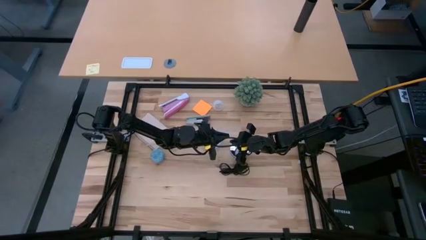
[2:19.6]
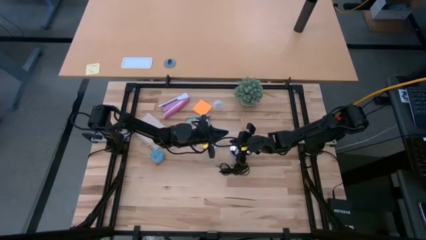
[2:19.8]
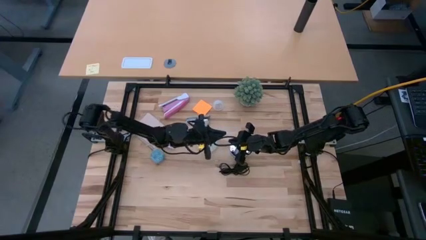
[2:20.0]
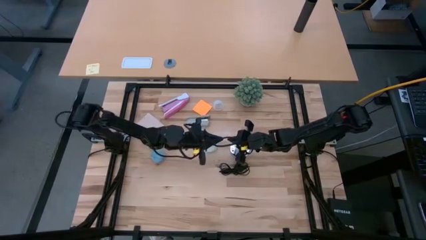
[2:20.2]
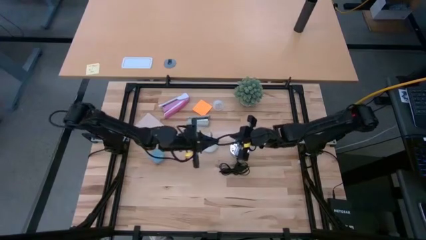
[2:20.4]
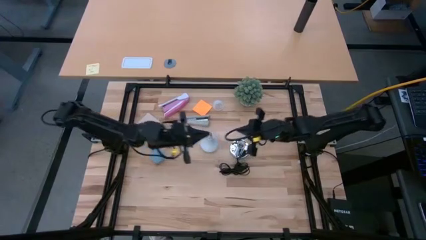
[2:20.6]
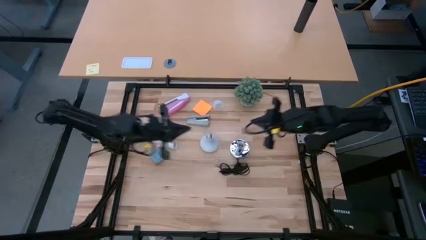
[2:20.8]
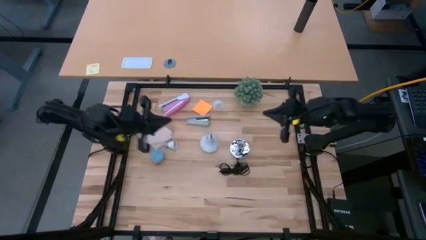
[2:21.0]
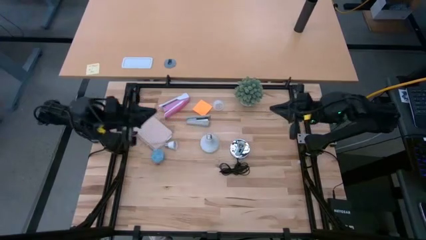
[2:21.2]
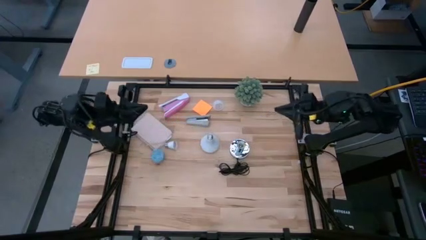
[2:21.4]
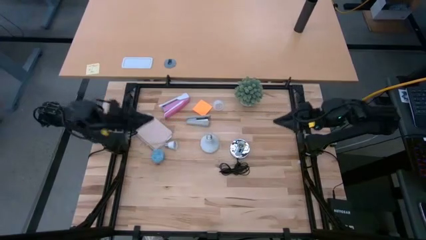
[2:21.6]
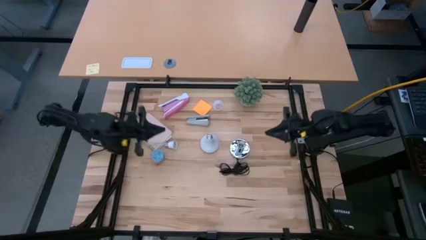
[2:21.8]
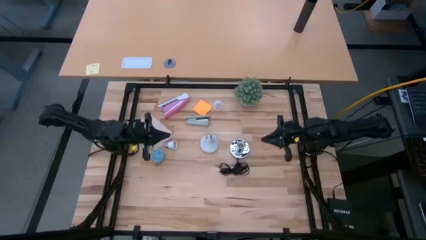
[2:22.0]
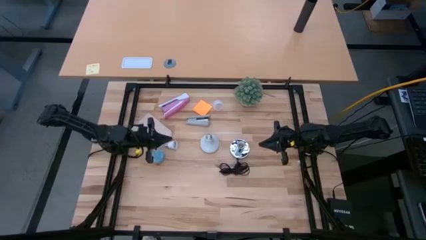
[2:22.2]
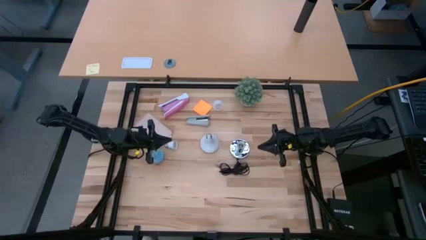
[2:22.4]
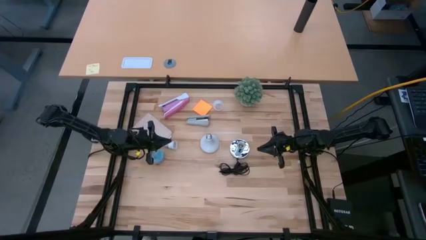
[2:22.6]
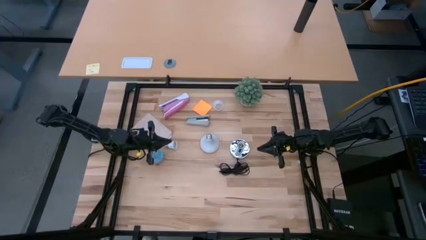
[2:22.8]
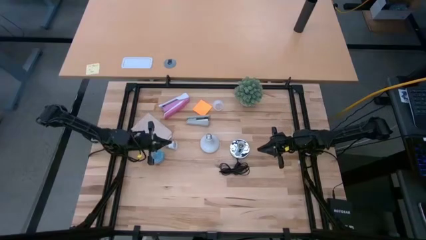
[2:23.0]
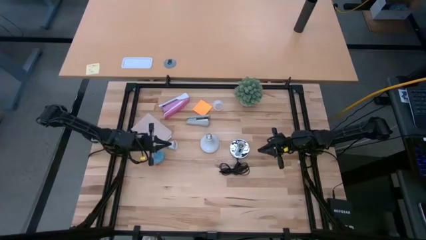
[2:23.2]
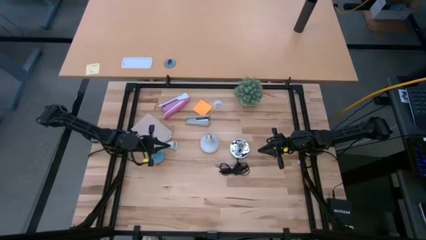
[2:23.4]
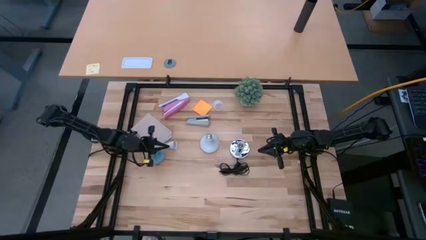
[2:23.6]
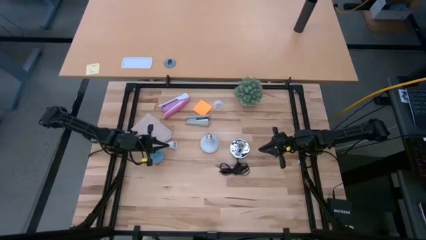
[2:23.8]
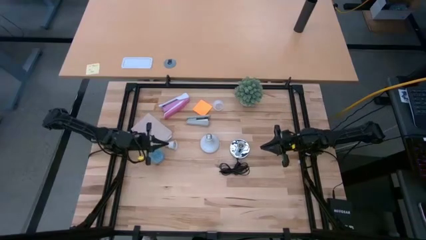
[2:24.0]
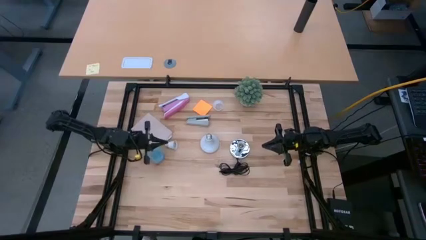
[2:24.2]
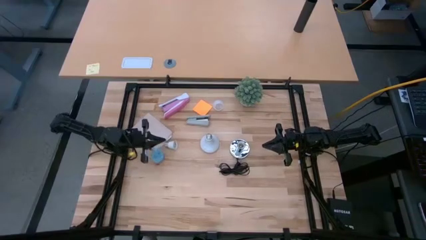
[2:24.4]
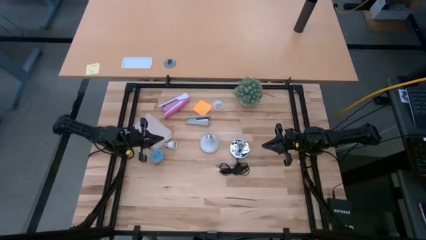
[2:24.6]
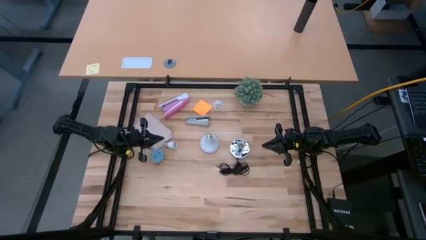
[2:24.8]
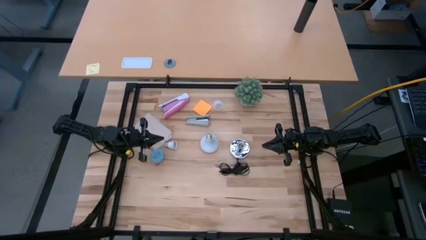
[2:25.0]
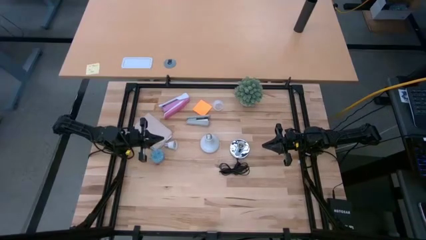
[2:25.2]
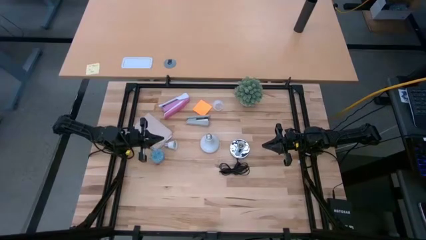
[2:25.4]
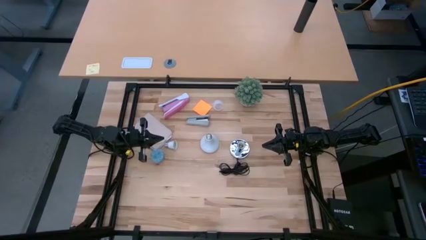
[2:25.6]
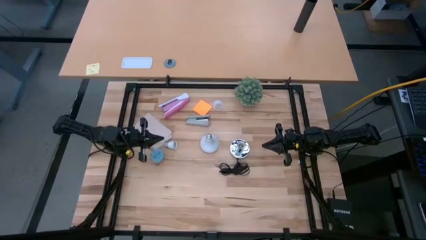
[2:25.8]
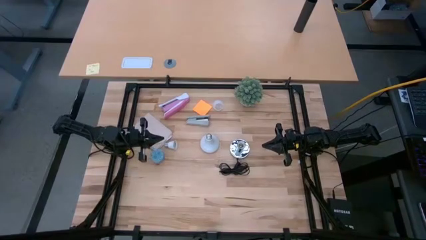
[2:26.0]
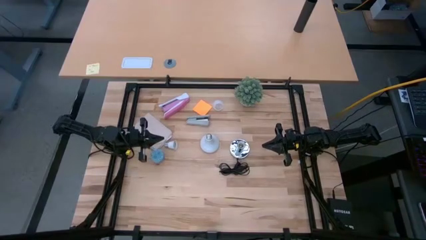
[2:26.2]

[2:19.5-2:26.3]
Task: Screw lightbulb
Return to Home Position

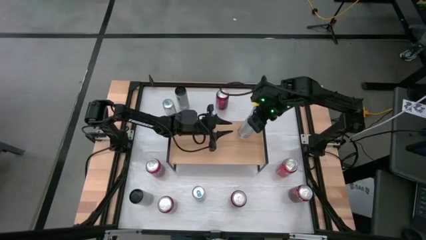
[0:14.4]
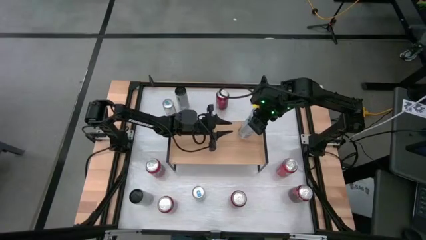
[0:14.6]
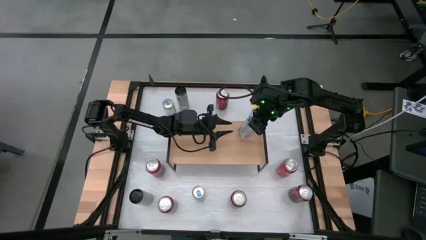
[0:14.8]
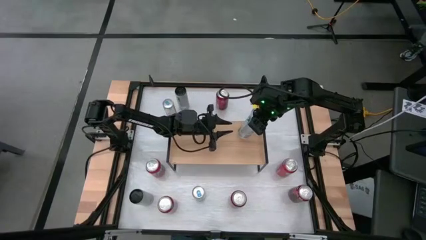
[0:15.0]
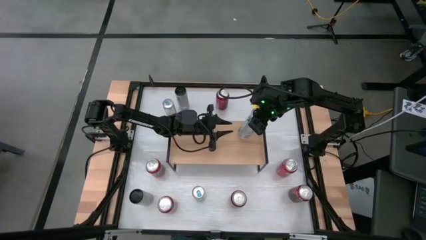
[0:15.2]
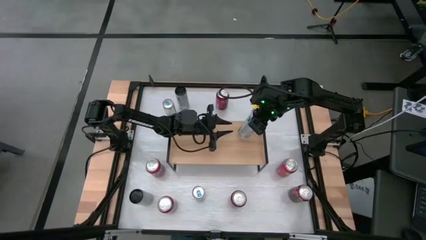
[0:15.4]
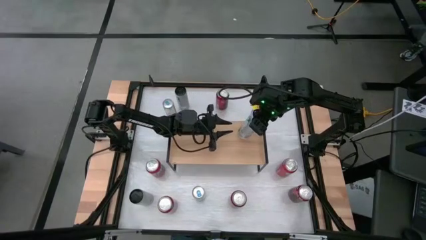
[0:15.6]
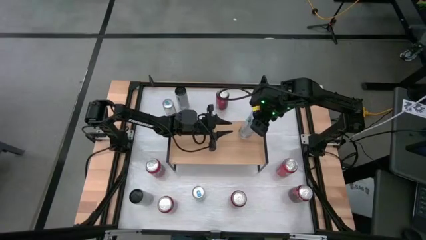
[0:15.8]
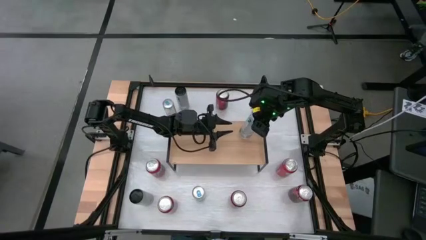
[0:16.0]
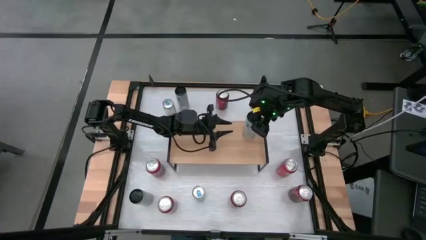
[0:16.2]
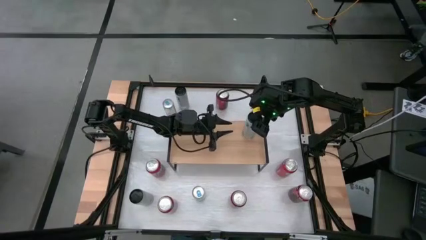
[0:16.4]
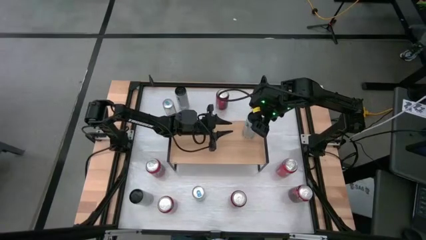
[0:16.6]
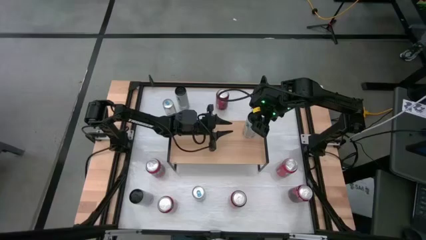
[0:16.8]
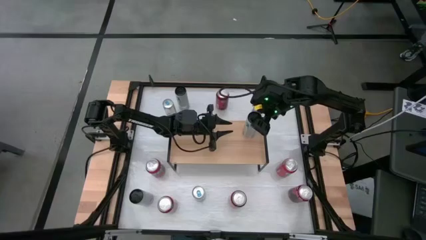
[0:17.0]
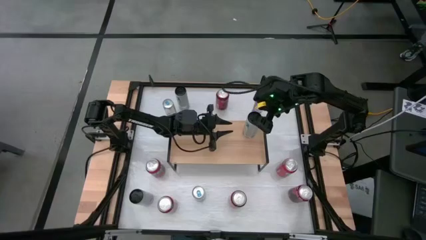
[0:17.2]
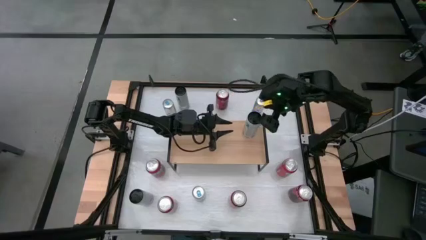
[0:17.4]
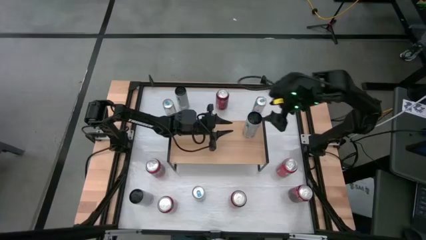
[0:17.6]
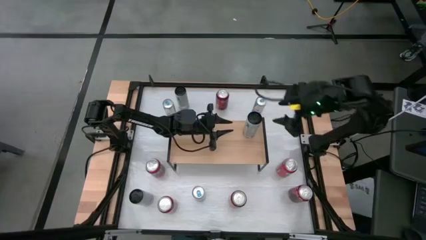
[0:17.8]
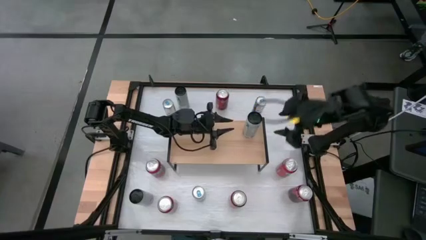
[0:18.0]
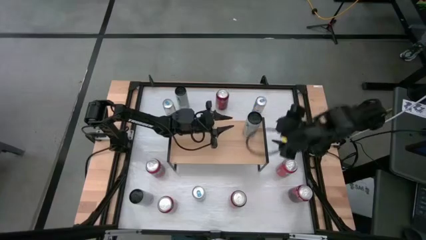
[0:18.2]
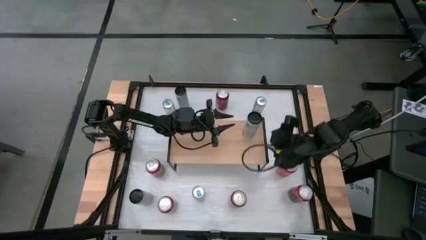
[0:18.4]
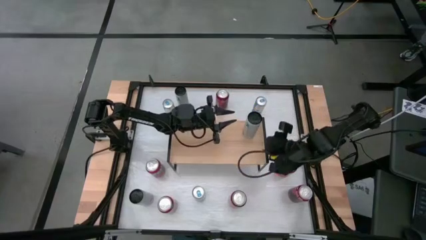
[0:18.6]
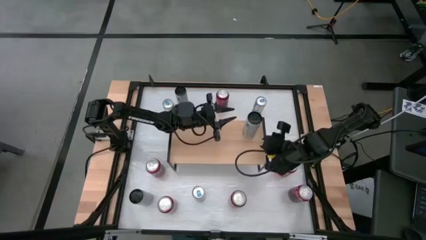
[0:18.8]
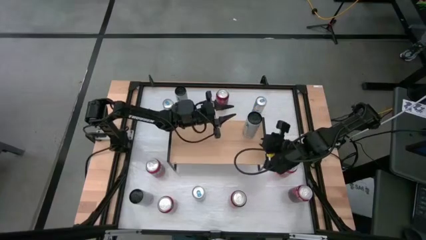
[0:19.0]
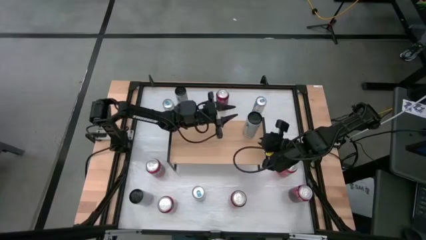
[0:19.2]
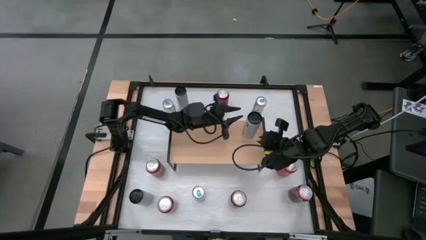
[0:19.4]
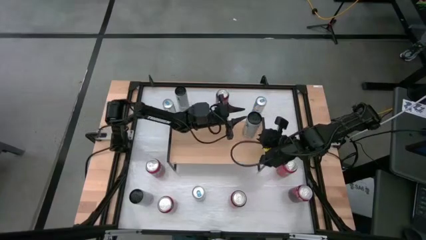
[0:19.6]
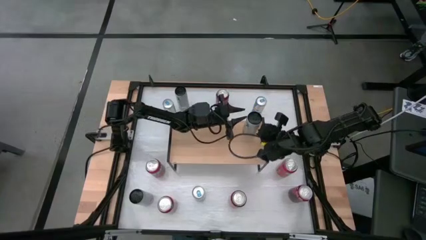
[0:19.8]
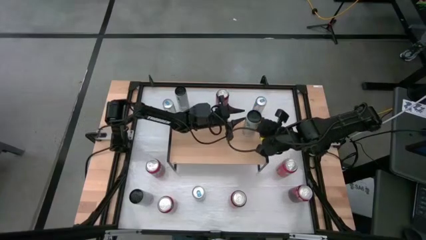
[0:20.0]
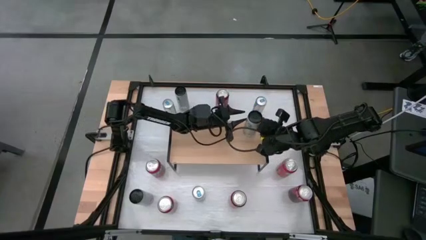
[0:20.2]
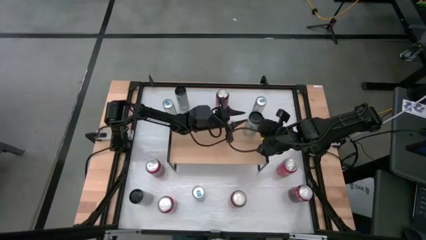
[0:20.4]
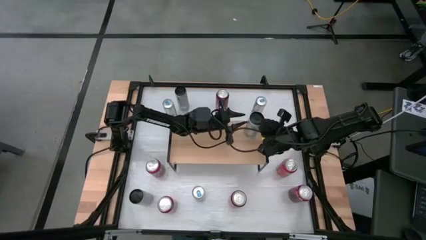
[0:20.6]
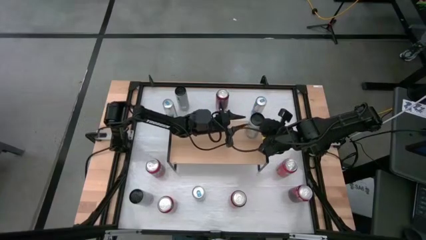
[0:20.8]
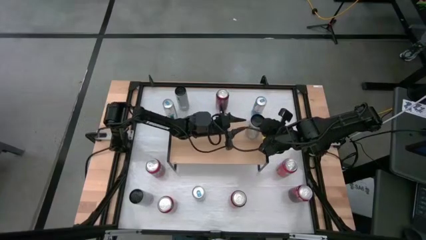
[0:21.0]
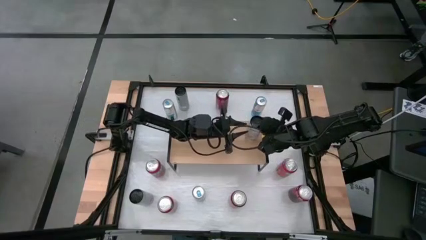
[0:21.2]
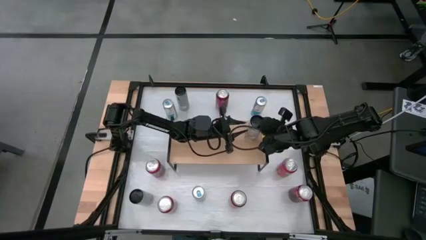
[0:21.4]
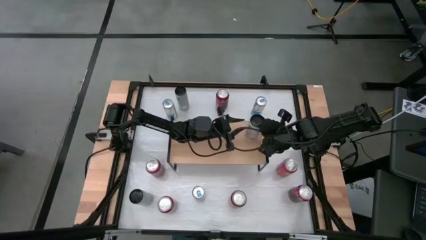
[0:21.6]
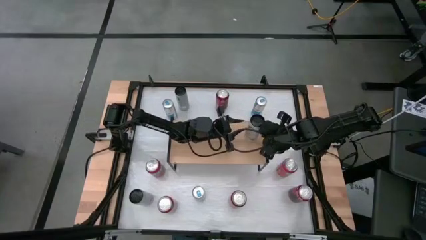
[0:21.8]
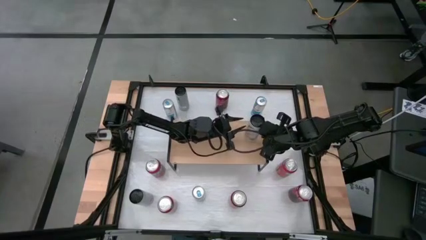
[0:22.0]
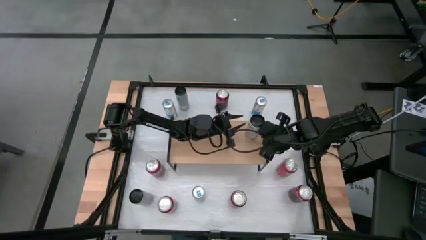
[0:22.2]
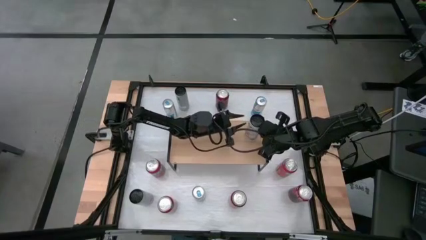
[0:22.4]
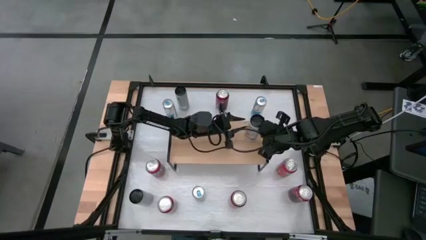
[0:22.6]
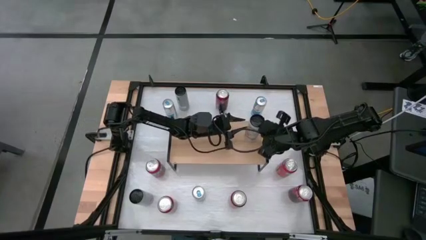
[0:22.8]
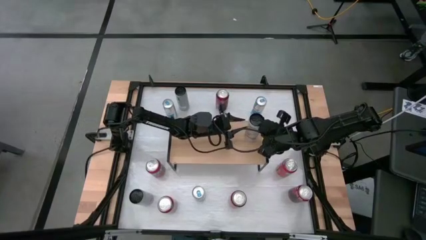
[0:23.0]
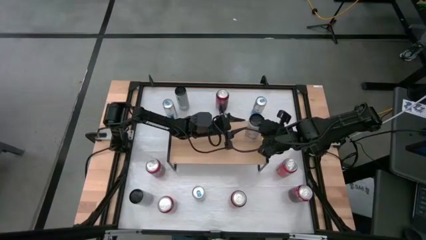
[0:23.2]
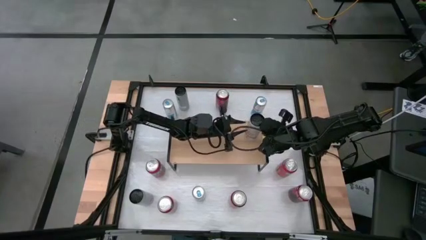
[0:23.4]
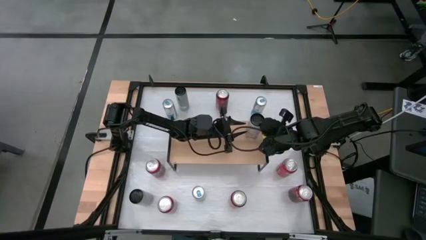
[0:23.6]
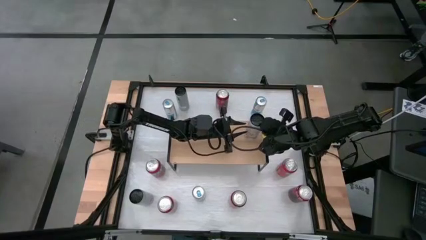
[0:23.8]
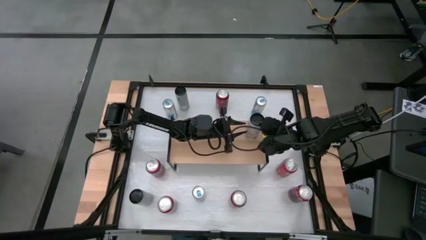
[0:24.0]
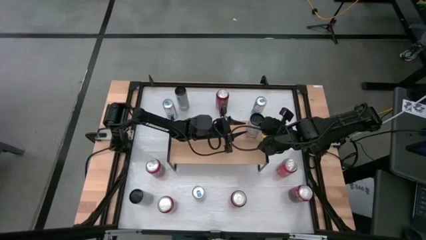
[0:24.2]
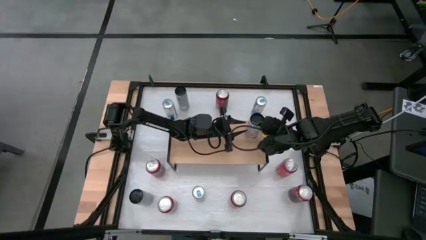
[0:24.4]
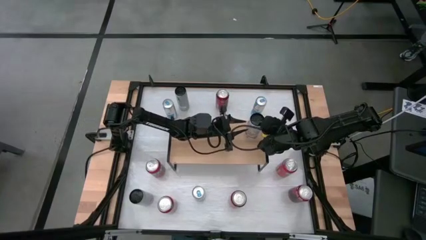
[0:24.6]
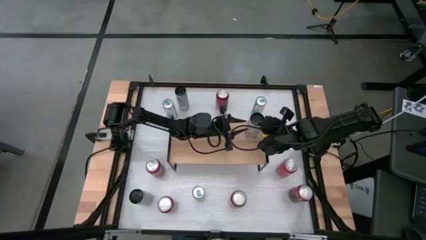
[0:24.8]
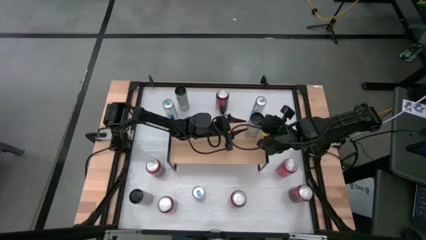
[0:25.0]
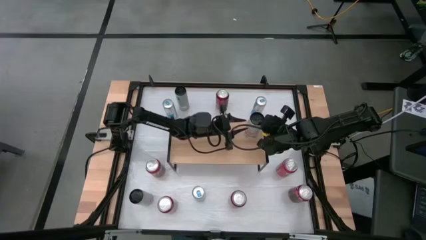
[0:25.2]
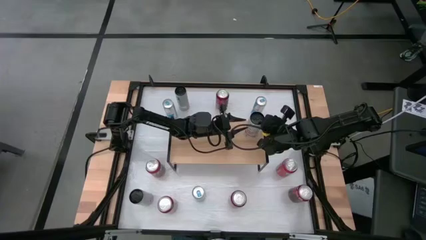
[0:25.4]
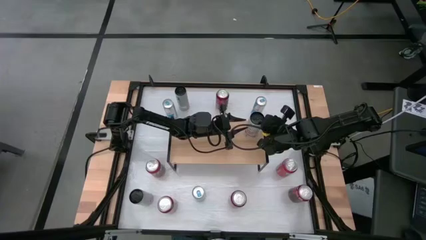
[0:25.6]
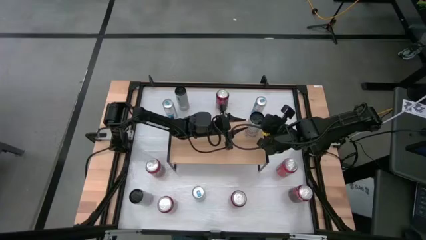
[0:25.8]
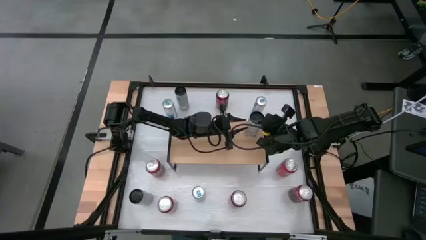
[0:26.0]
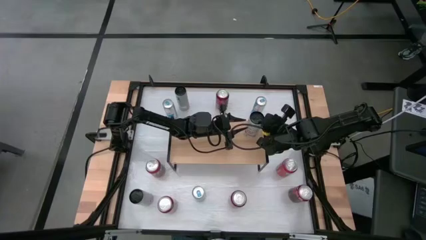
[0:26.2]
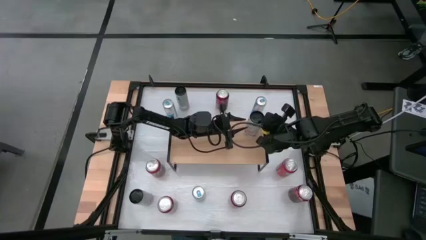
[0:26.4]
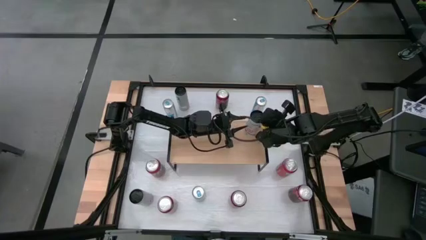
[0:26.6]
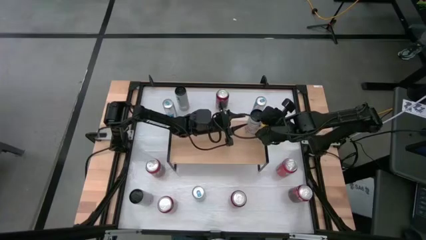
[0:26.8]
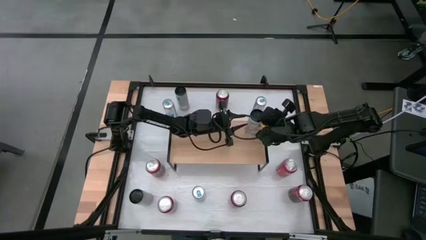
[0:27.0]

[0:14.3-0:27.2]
Task: Place canned beverage on shelf
Put the top right white-pink soda can on the shelf
